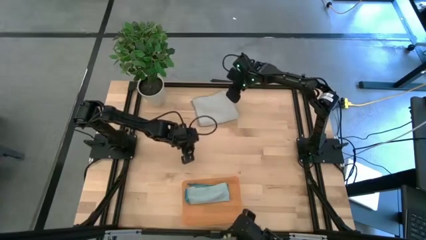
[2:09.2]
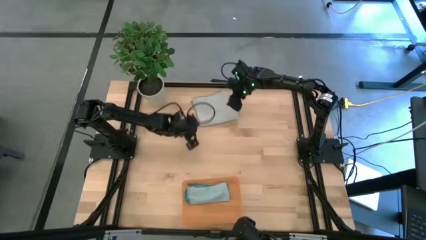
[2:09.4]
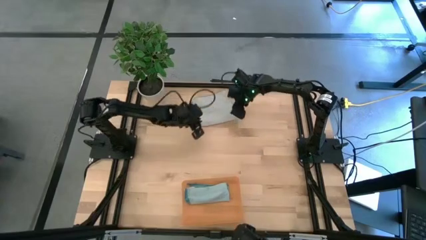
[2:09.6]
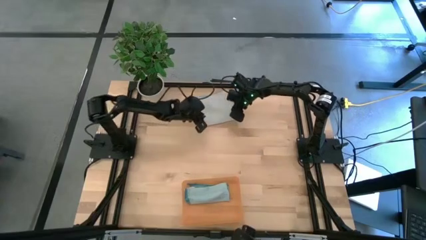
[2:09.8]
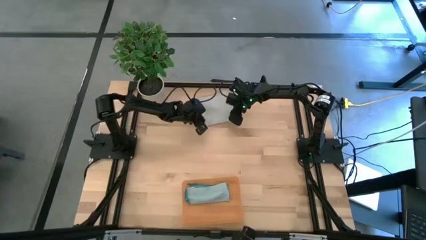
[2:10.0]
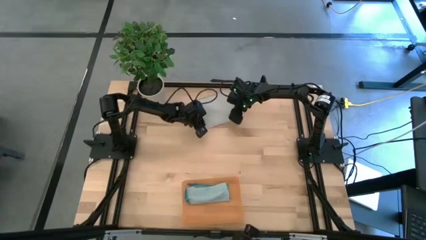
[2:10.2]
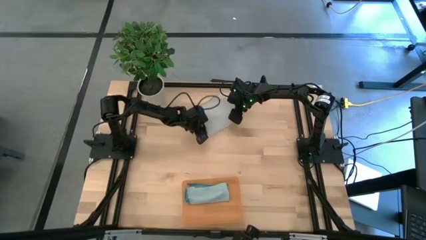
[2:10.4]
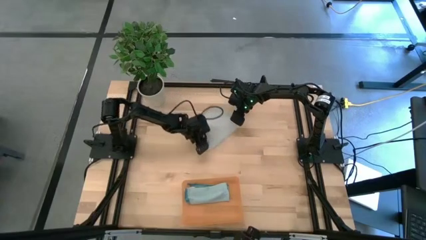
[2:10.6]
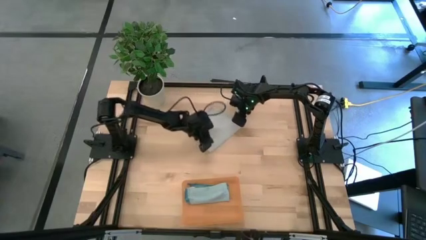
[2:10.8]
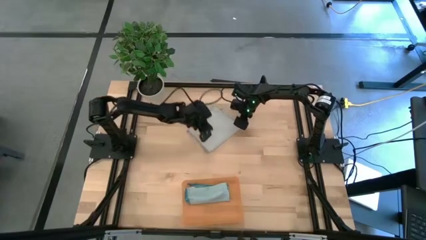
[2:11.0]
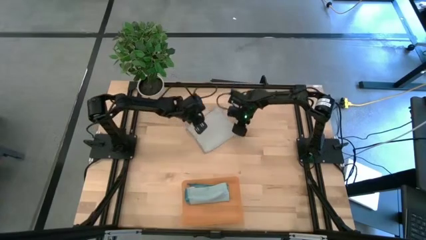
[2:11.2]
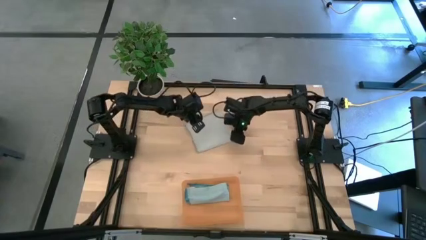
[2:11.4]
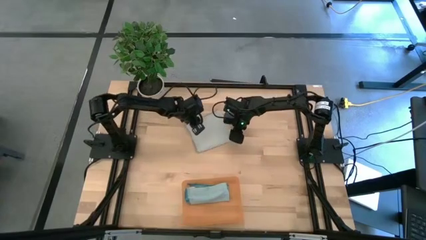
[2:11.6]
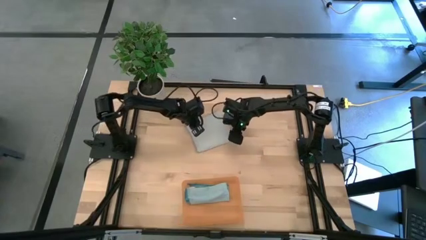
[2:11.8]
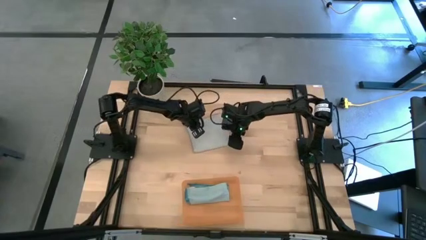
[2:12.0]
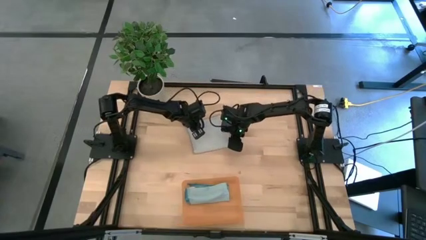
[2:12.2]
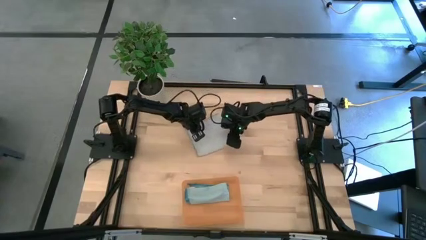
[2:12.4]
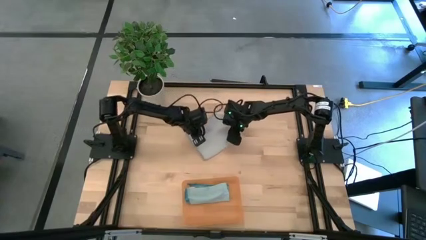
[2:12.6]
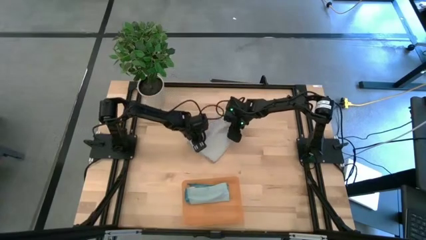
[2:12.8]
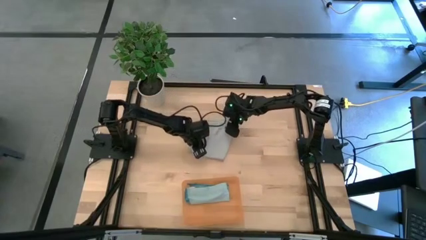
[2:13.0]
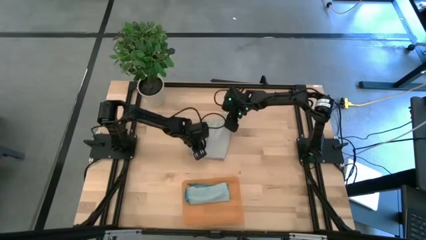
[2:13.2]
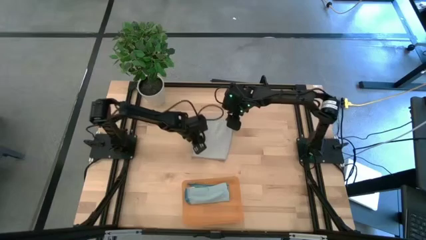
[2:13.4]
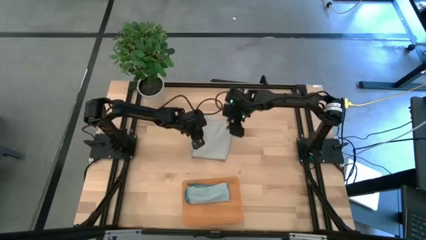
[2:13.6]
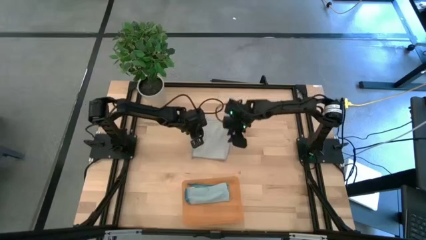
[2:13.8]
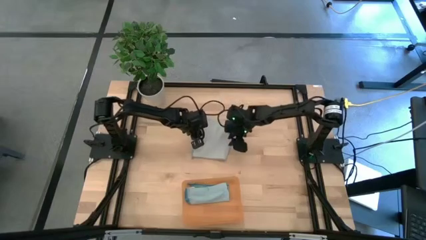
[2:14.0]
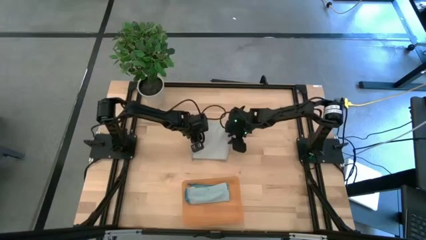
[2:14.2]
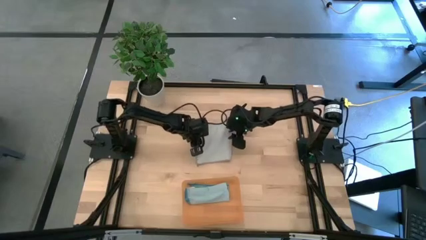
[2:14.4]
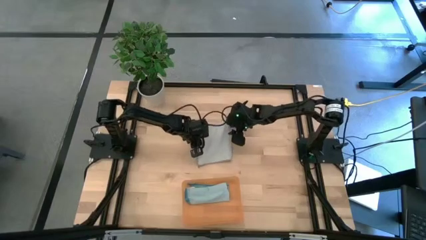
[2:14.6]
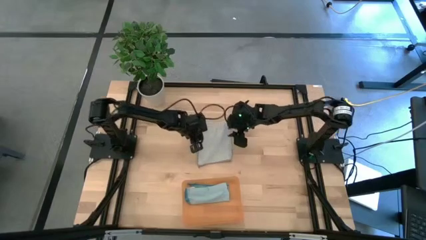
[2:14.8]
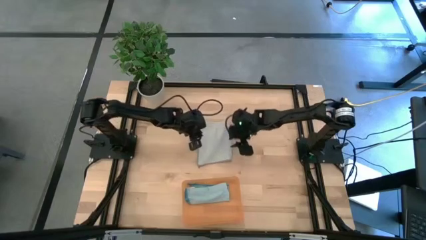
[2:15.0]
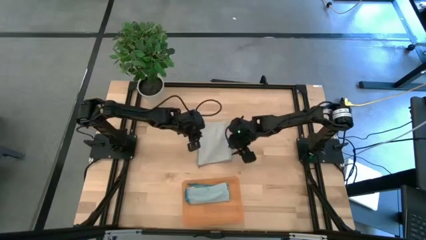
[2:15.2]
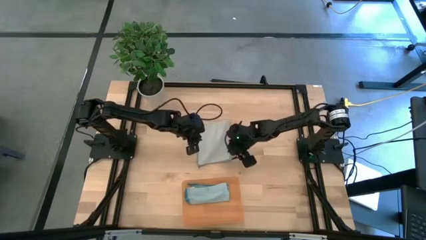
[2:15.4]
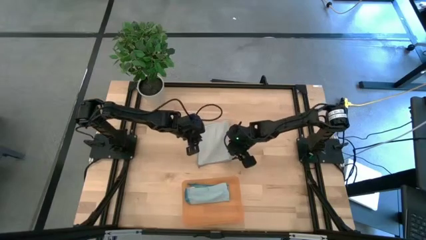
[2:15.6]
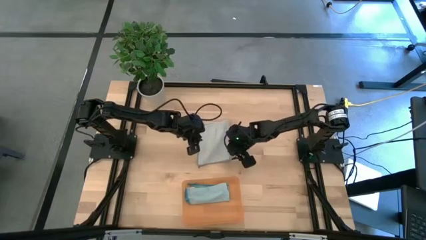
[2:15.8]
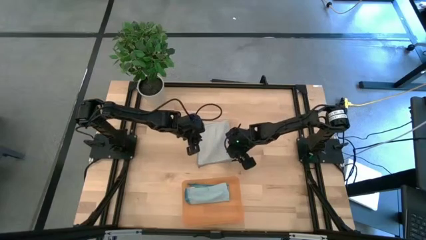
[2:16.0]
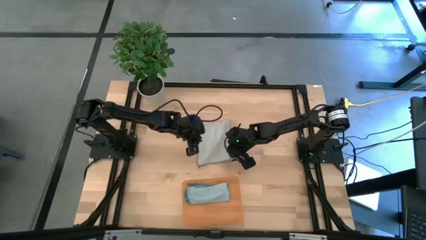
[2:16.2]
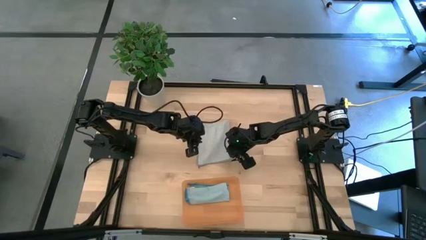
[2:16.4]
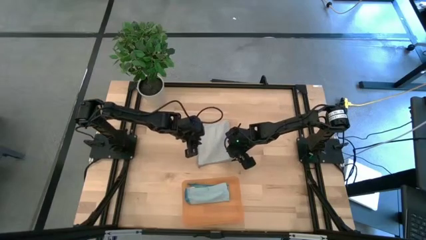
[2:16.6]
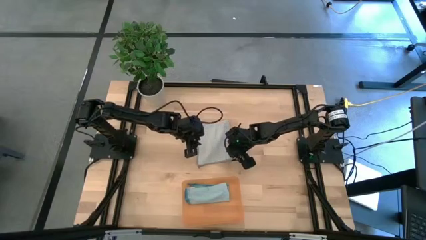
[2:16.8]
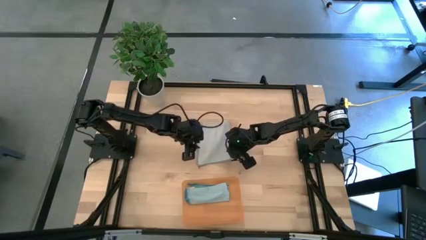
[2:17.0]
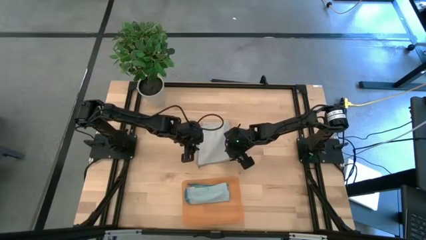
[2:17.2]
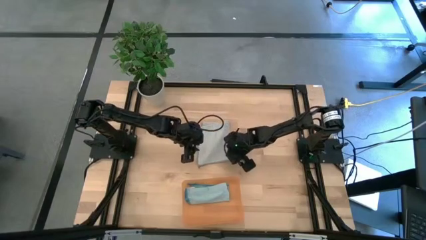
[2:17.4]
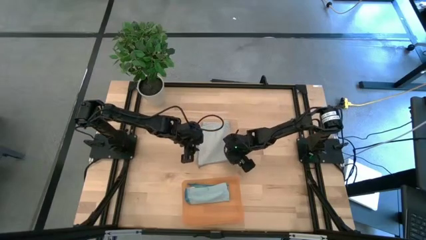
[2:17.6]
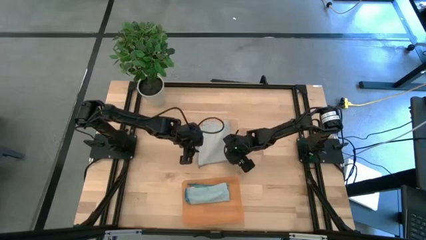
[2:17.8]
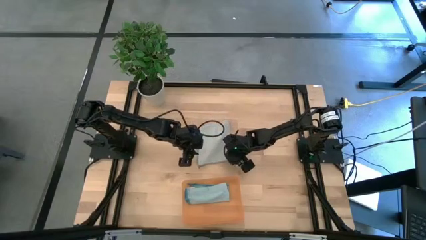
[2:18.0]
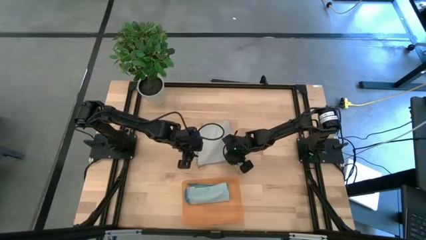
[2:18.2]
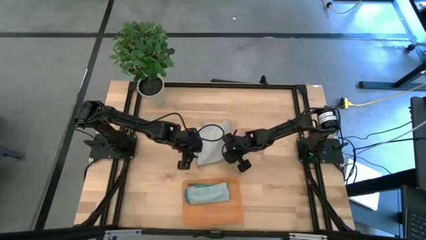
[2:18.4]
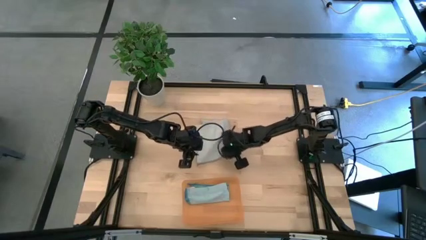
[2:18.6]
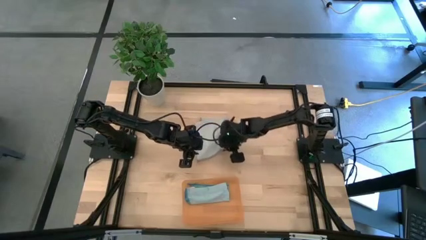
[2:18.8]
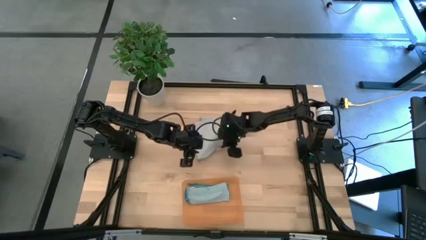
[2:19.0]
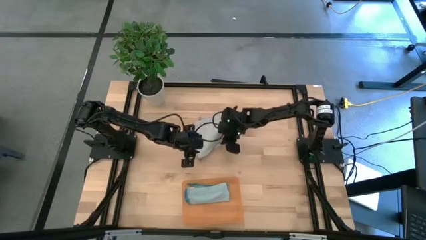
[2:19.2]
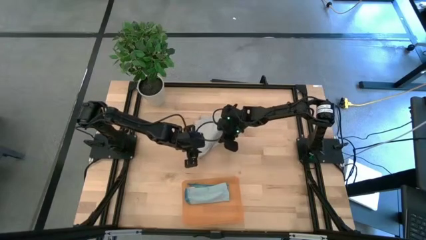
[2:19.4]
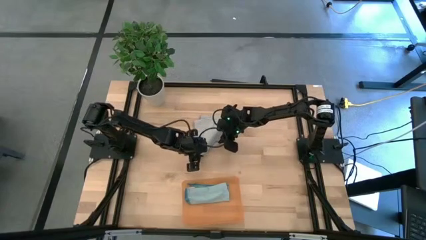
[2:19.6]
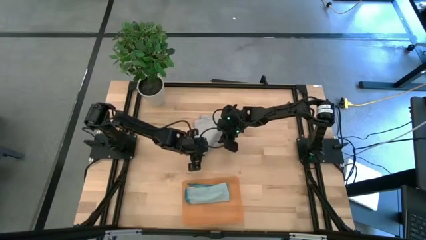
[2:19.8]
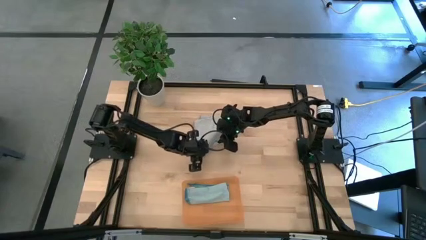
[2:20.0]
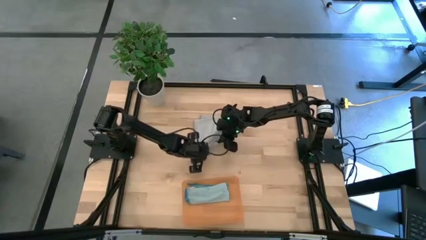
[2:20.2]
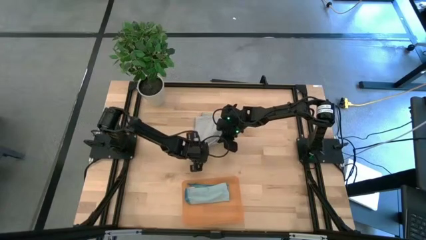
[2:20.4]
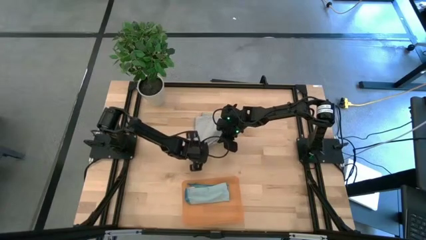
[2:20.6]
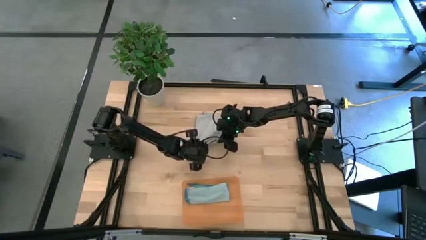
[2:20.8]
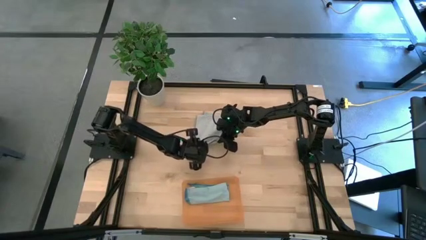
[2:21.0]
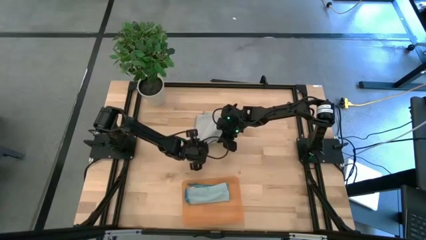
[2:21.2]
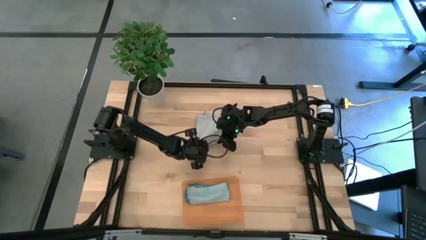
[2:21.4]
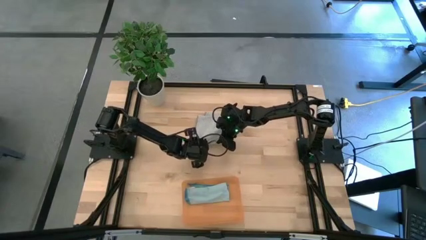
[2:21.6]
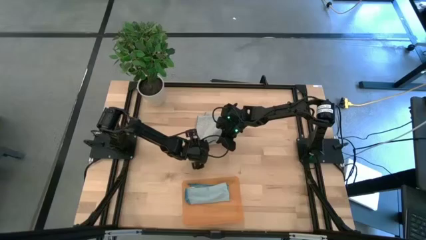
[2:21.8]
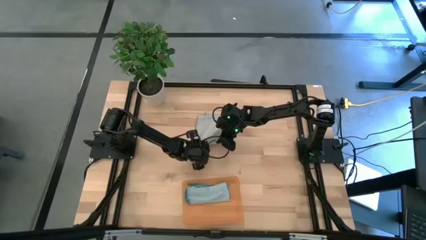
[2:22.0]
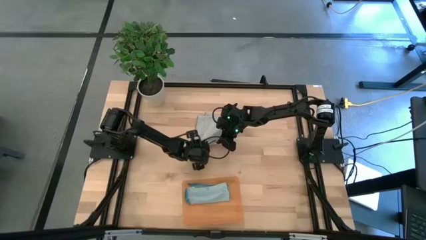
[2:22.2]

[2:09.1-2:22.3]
Task: Roll microfiber towels into tight, uniform cylinder then place into a basket
Roll the gray towel
